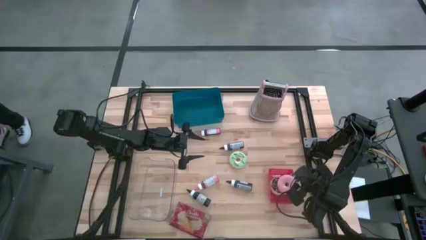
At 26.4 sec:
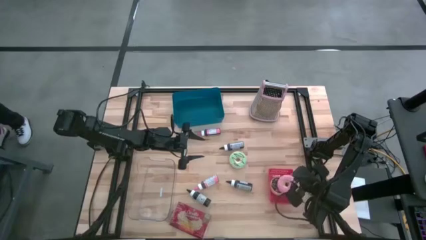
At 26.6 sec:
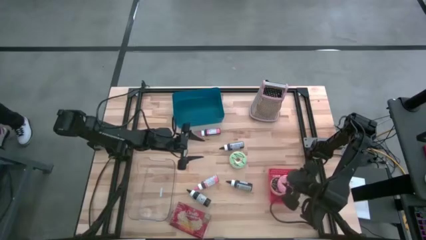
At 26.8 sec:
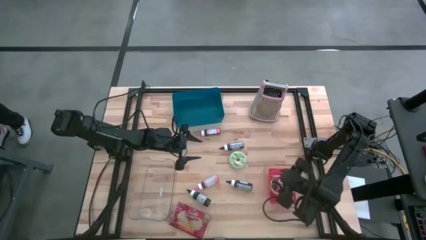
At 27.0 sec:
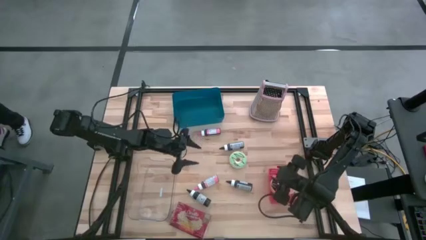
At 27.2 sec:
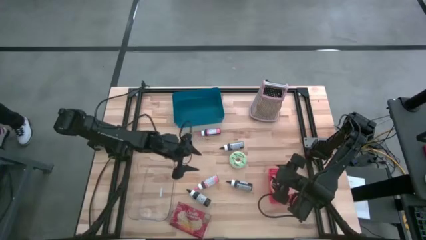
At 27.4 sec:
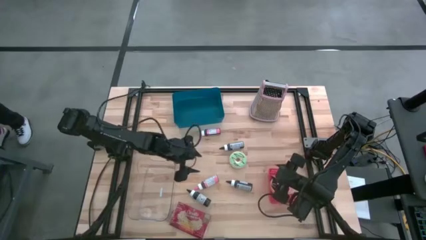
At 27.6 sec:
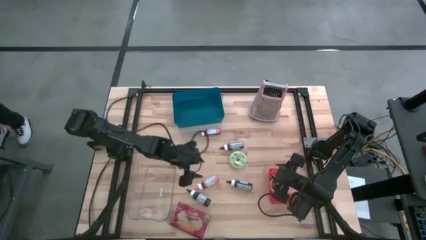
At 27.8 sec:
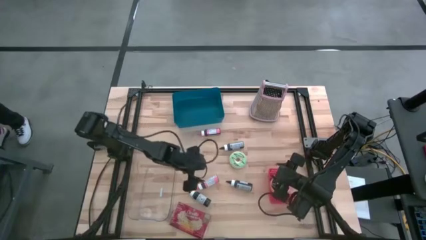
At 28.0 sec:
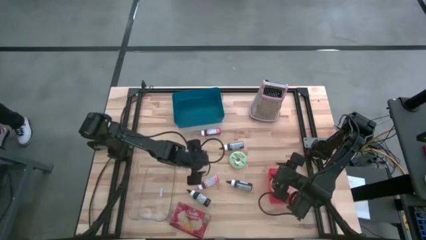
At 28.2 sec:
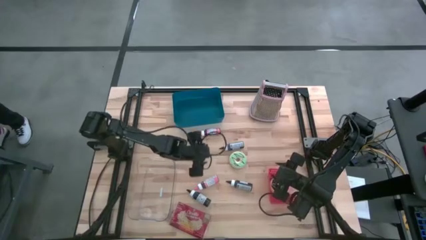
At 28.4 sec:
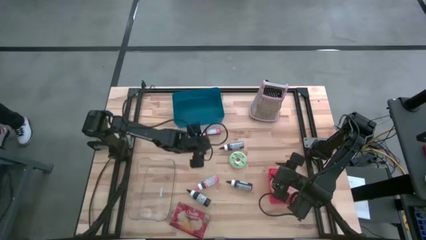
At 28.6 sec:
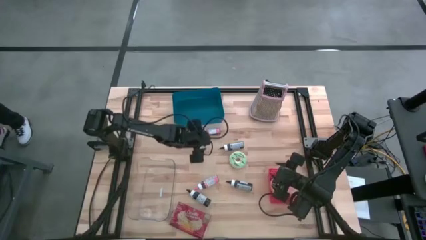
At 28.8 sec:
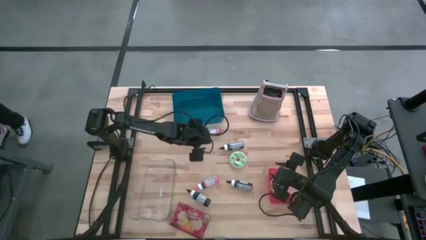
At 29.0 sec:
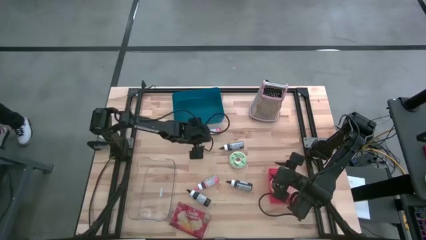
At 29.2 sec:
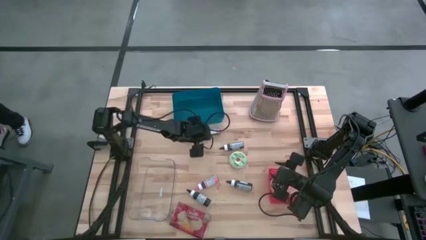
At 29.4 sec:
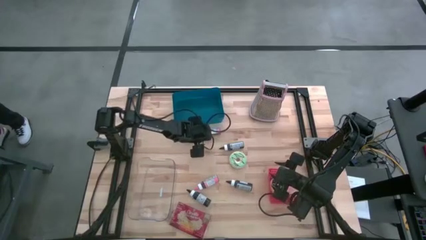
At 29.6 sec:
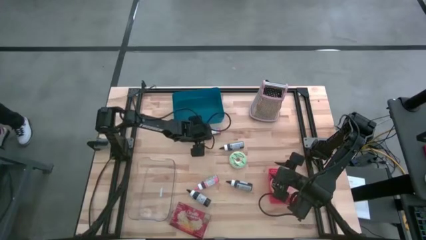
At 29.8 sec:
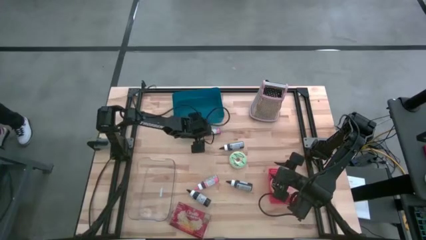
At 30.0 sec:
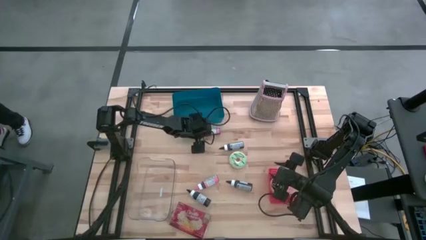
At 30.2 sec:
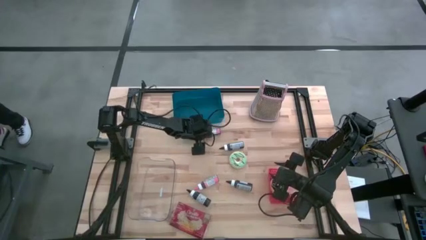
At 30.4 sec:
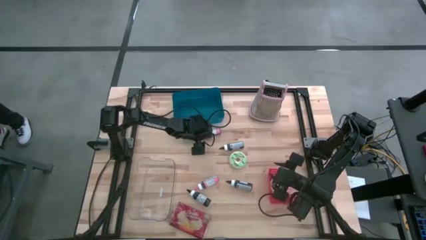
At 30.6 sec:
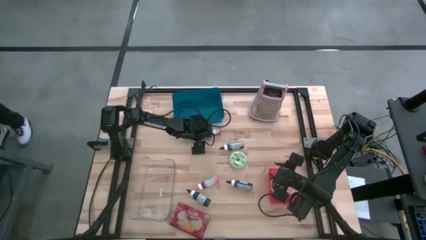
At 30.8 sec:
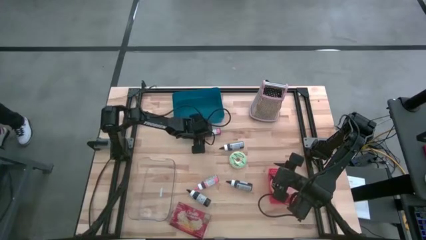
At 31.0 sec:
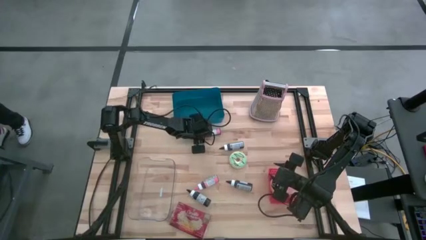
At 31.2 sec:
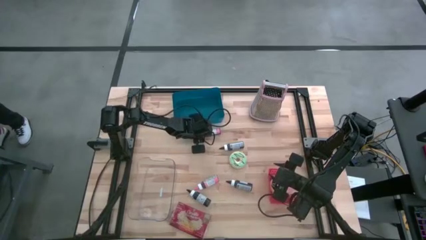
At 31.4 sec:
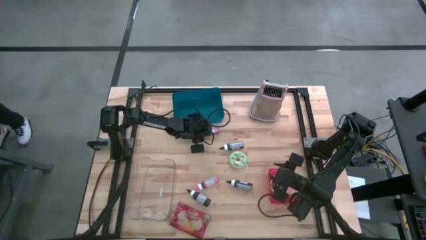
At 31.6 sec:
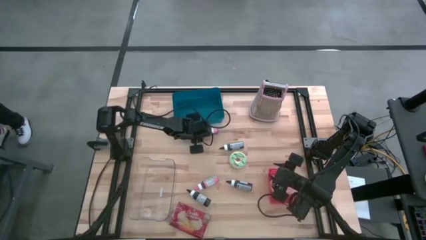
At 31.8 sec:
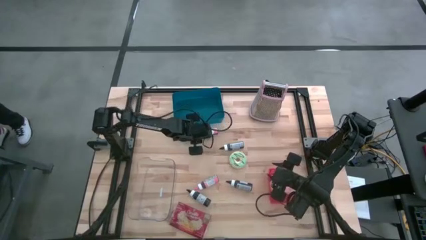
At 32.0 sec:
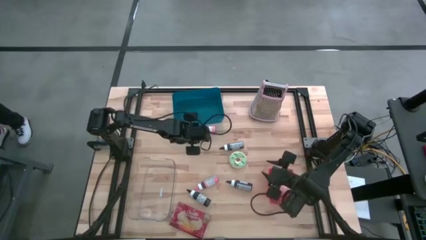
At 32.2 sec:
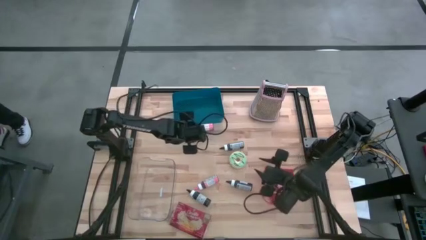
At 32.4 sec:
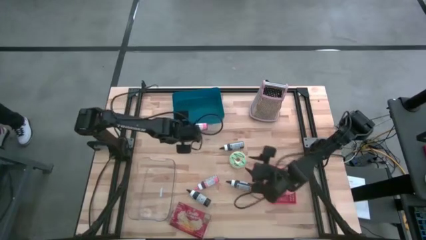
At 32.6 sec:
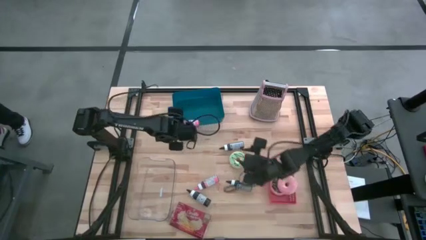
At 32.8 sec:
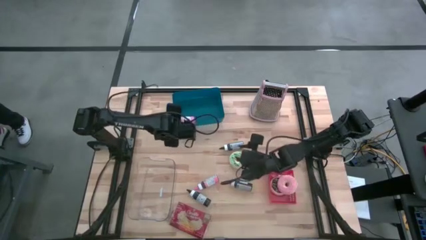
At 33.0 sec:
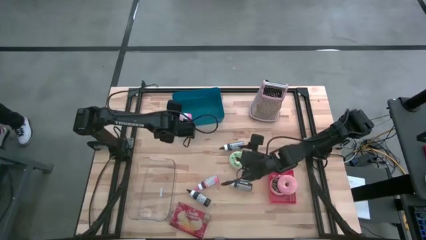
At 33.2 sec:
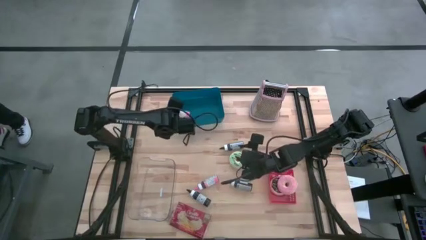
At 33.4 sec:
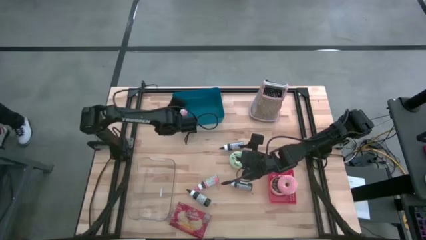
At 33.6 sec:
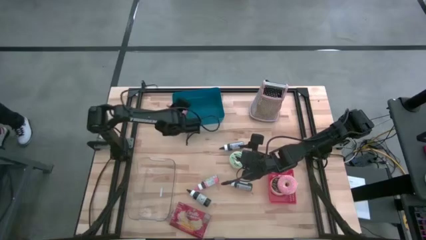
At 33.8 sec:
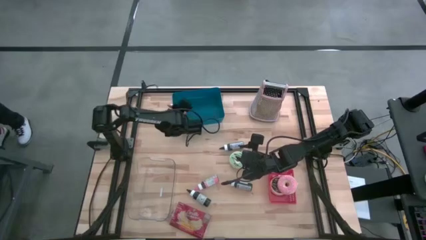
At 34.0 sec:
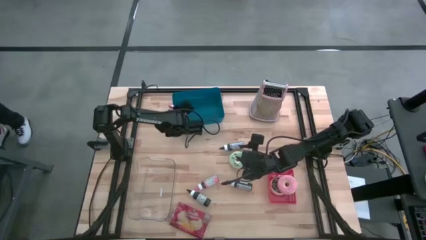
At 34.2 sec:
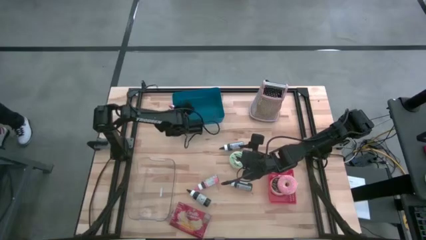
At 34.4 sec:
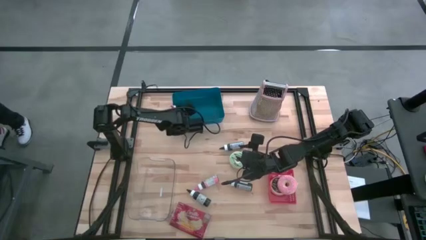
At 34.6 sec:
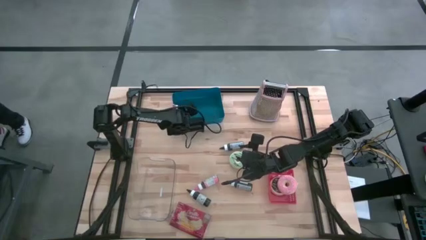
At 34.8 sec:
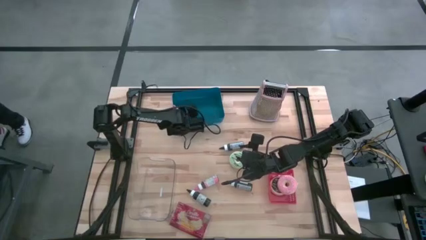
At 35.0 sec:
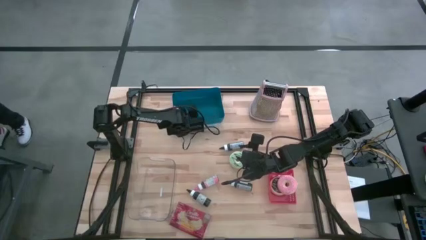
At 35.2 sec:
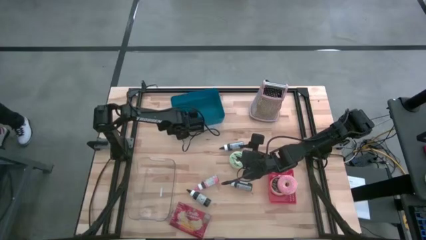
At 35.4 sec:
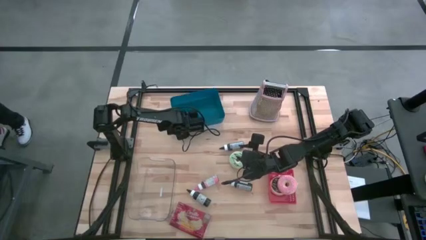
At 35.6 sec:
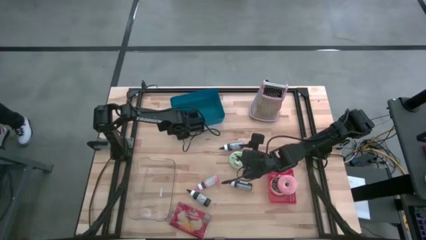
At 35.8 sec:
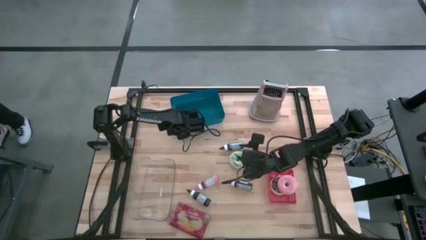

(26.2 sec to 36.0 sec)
Task: Pick & Place Food Item
Put the top pink food coloring bottle into the blue bin

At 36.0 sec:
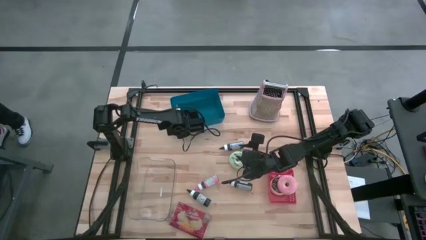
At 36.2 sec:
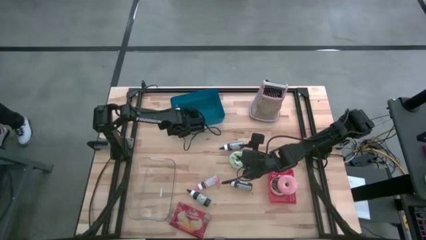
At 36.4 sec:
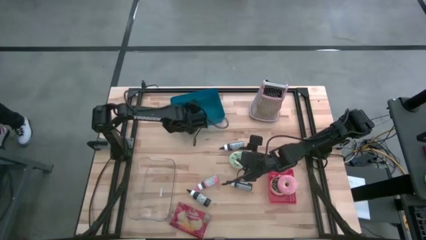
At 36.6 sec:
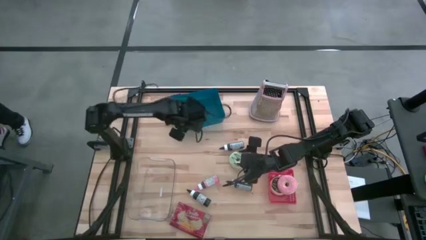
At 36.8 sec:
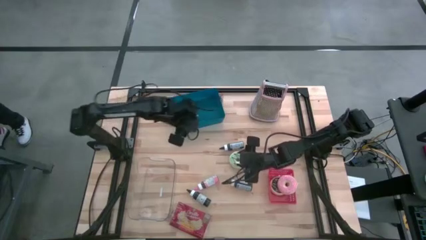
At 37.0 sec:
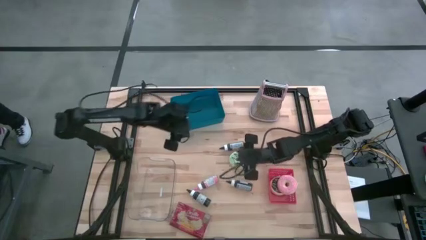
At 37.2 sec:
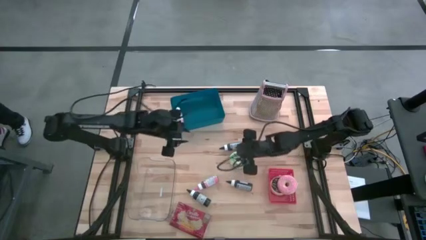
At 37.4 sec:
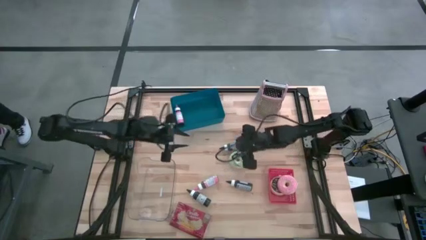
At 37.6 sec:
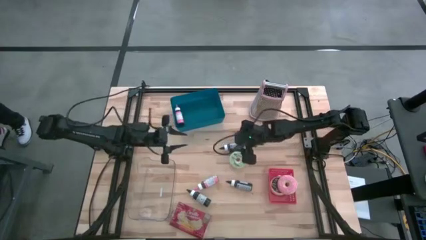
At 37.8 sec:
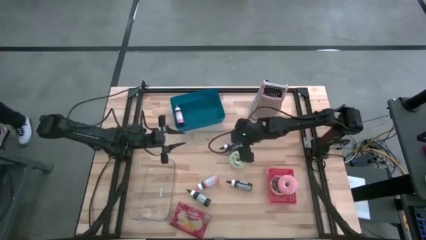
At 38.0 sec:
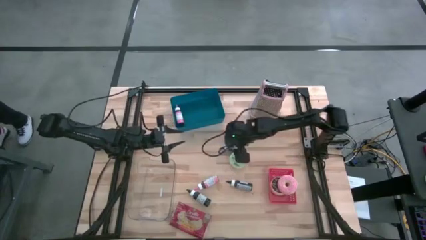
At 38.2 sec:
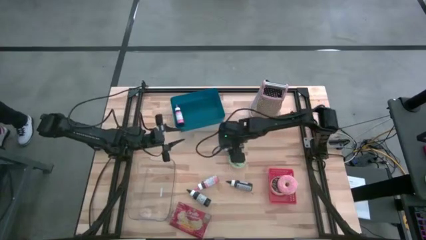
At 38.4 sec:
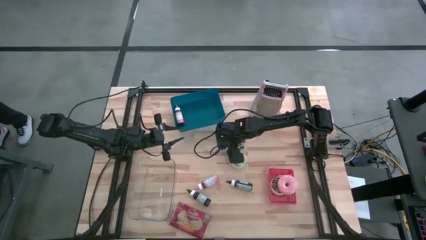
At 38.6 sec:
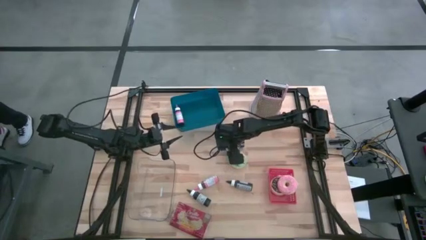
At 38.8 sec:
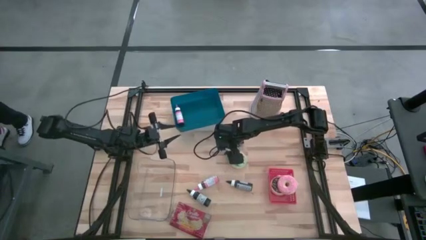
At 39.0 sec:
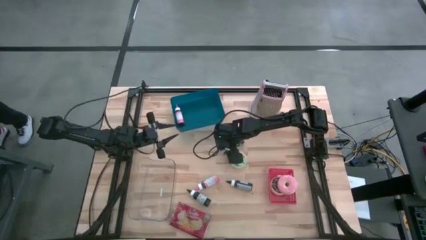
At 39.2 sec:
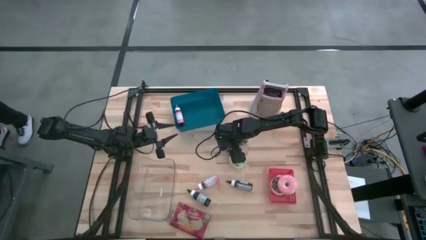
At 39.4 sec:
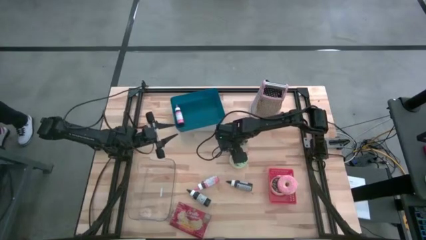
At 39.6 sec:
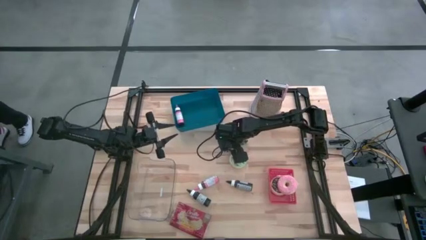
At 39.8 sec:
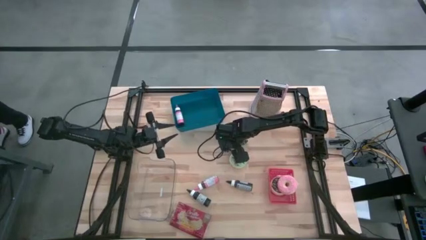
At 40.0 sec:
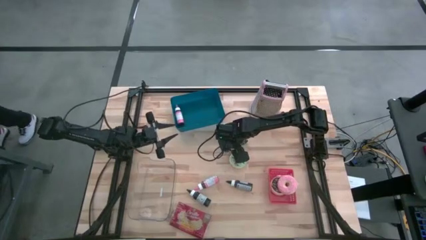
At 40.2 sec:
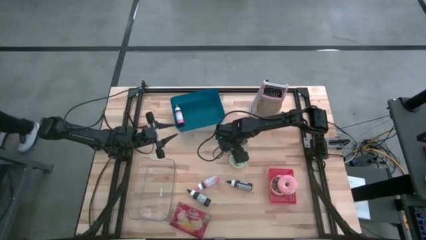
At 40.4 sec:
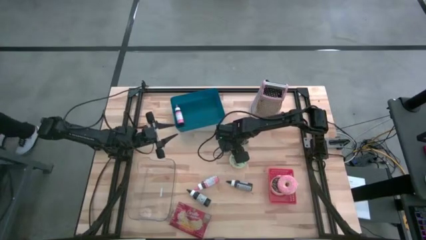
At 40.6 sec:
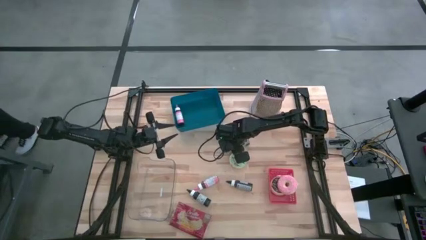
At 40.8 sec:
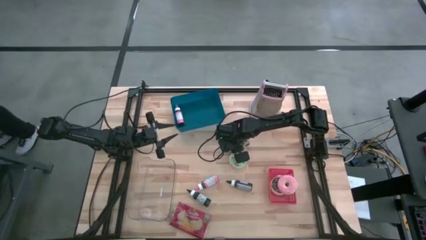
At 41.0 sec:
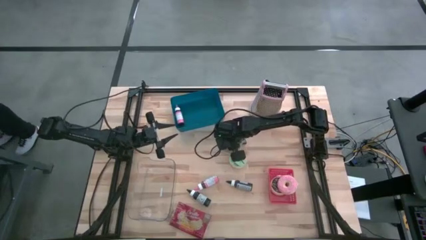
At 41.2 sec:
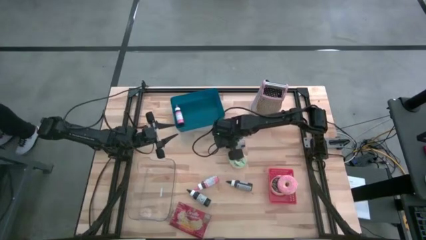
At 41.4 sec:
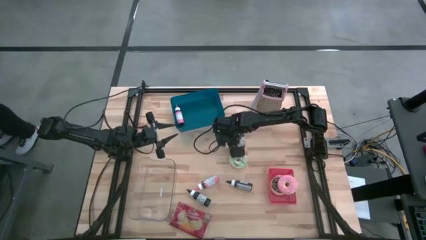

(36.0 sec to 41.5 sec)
Put the top black food coloring bottle into the blue bin

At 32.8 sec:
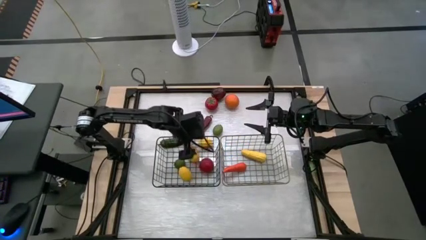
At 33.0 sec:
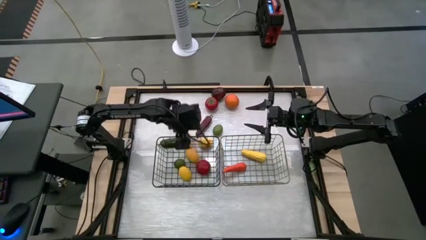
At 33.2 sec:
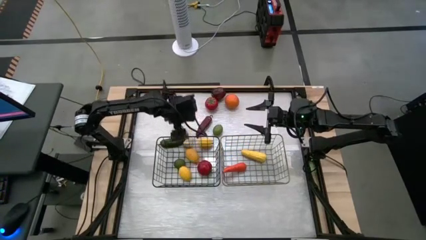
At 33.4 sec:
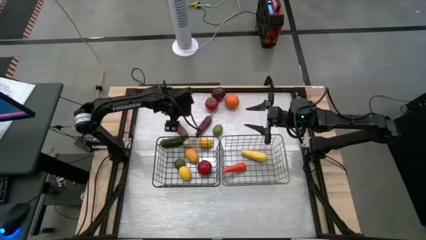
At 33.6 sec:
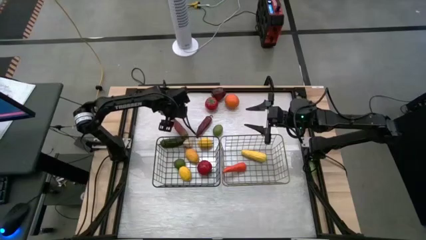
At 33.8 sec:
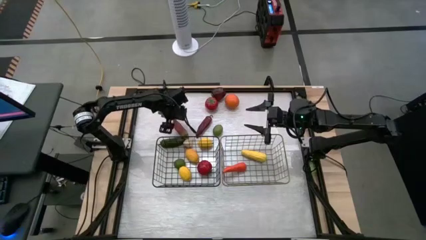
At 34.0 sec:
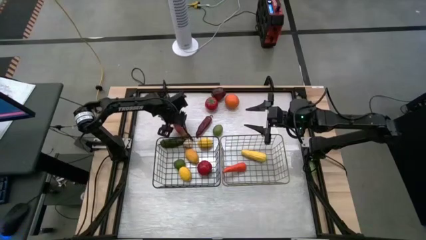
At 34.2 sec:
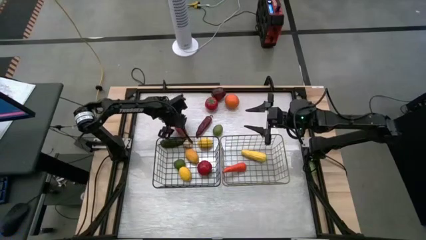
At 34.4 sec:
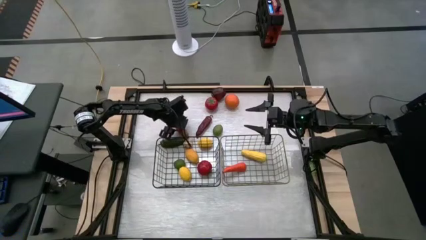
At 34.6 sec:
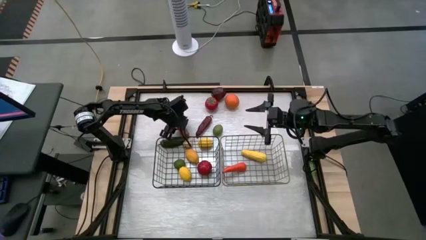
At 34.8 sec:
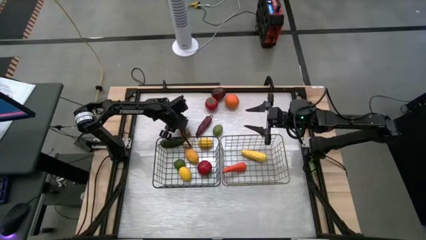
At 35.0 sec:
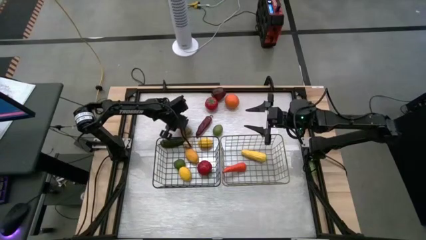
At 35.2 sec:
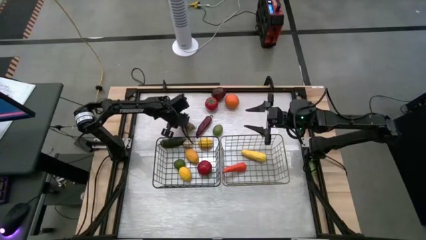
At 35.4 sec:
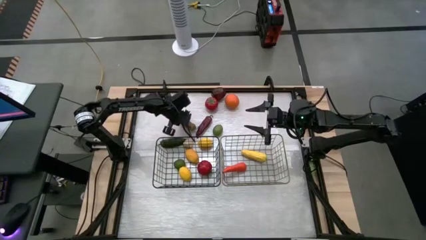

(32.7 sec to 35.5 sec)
Task: Sort produce into baskets
Put the left red bell pepper into the gold wire basket
